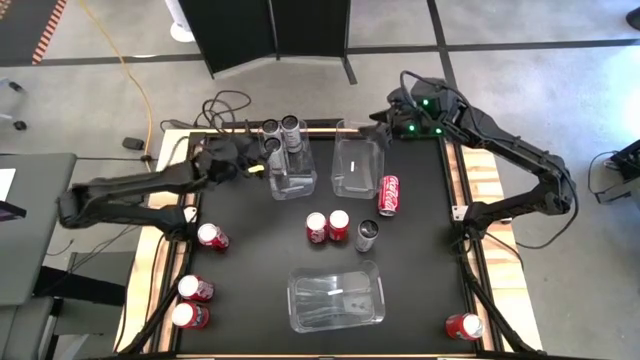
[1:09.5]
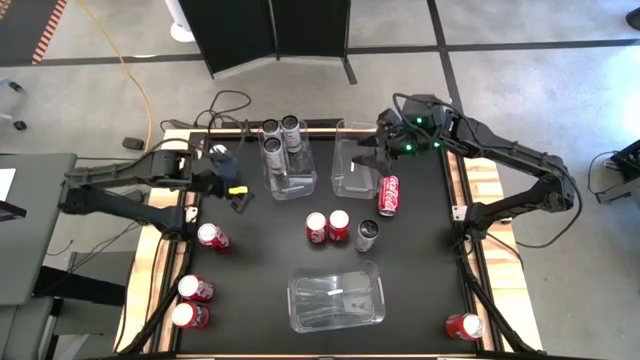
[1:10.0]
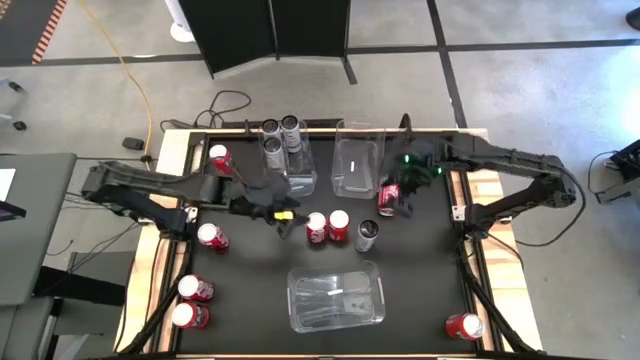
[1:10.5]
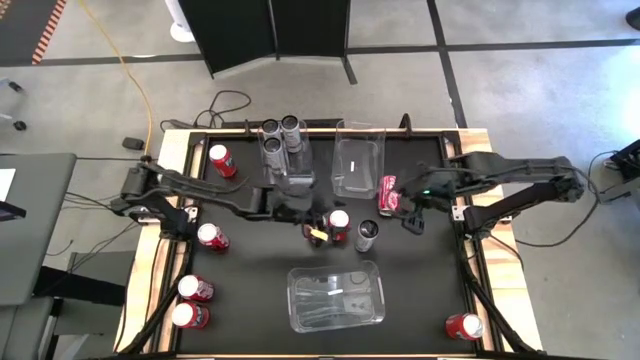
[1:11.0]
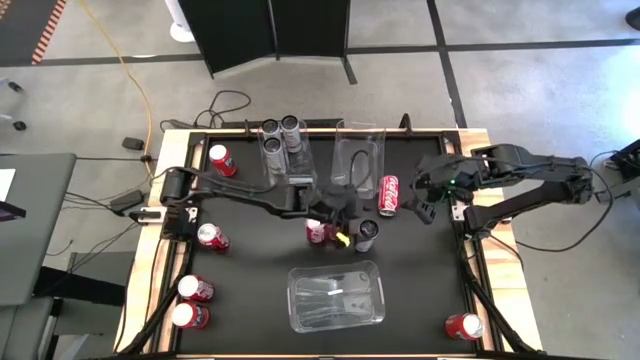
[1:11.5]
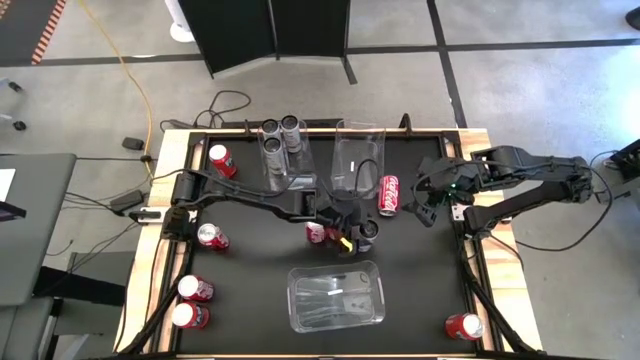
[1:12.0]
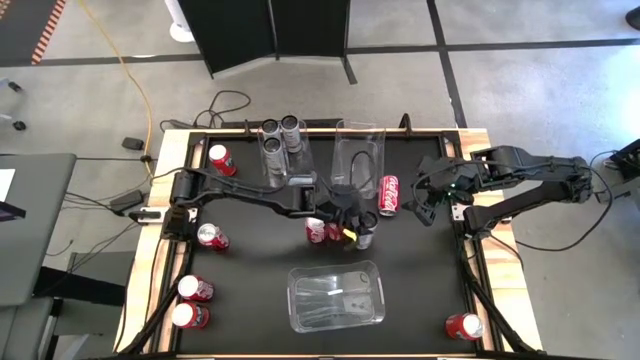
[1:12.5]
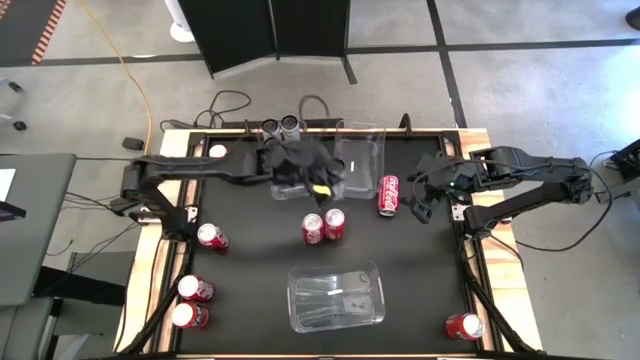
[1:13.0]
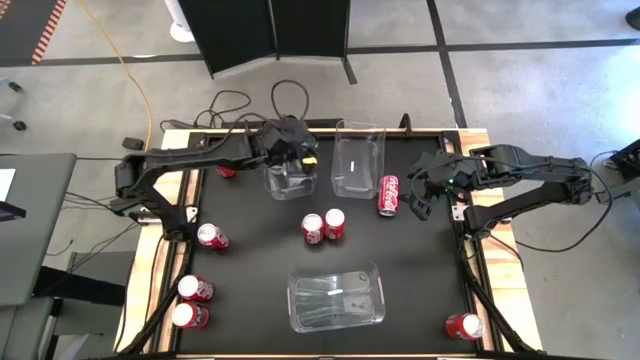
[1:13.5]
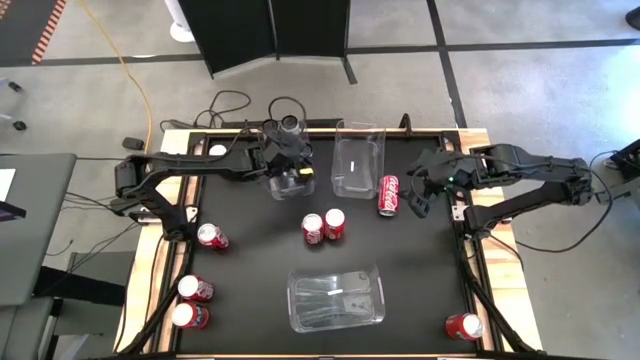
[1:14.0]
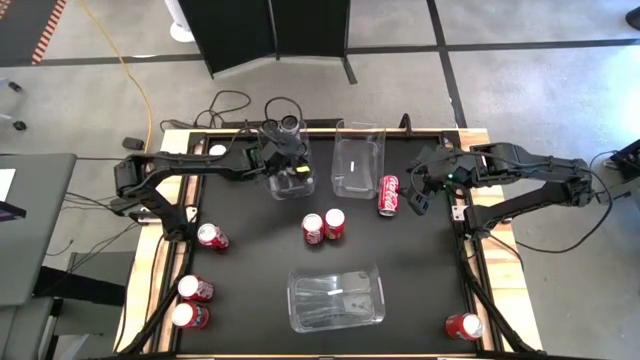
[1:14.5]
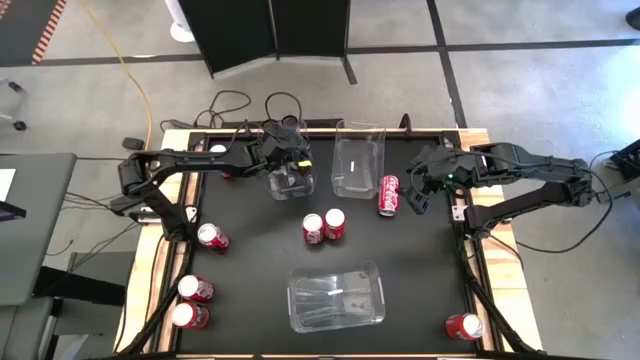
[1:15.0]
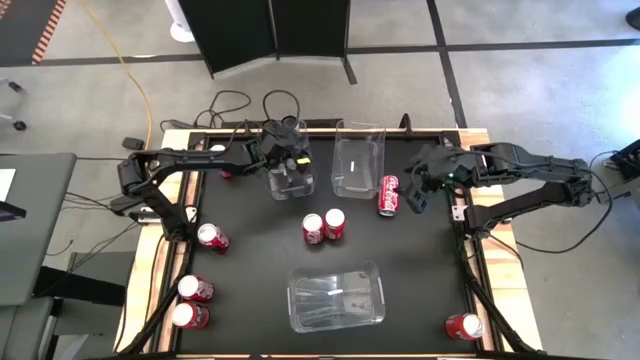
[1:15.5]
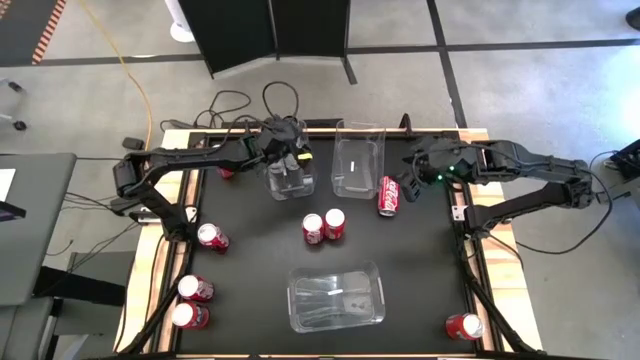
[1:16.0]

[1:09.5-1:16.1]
Task: Sort soda cans
Put the white soda can into the top left transparent bin

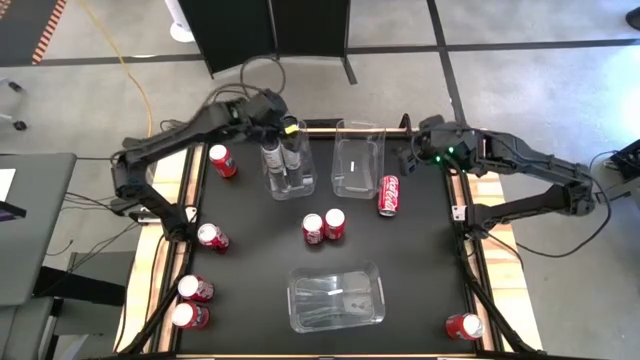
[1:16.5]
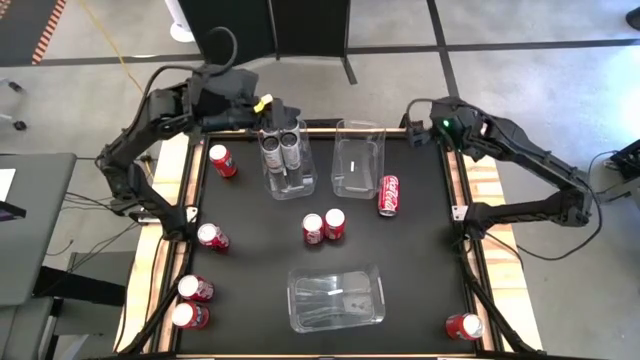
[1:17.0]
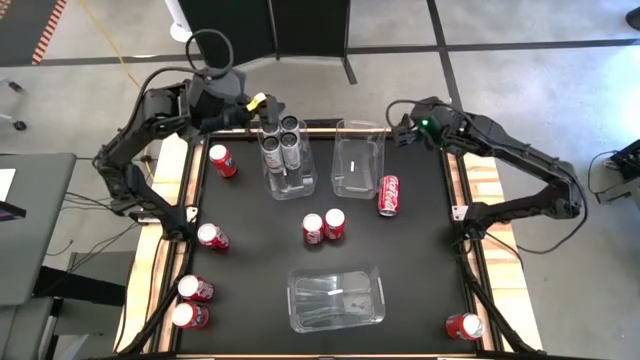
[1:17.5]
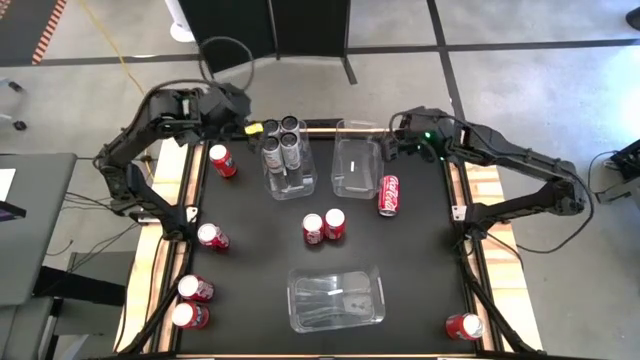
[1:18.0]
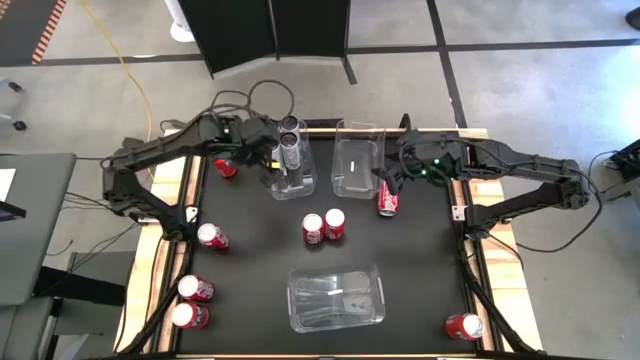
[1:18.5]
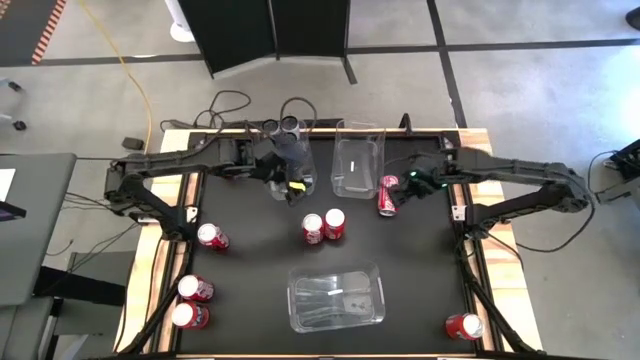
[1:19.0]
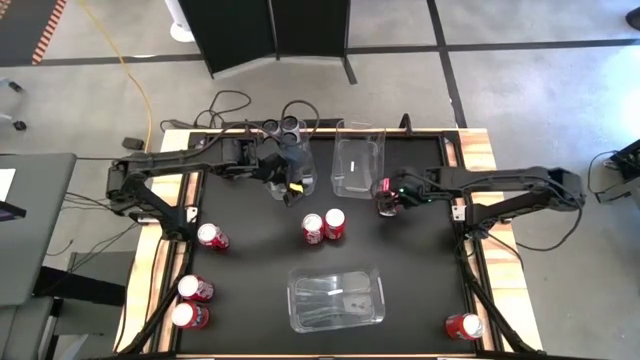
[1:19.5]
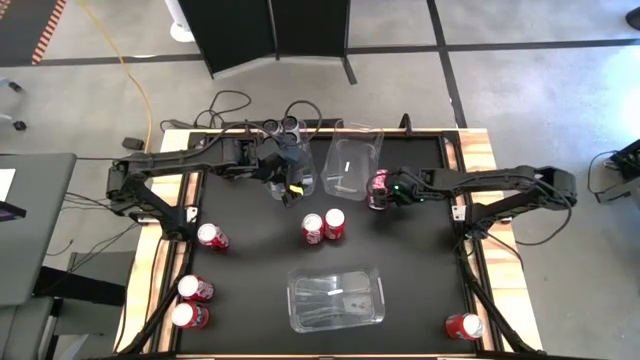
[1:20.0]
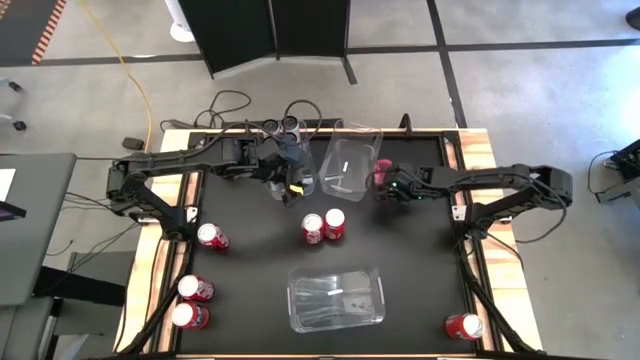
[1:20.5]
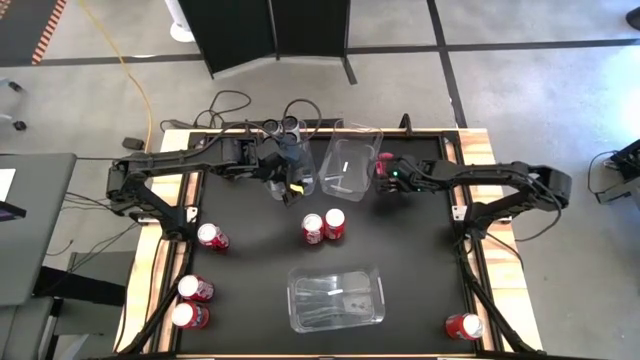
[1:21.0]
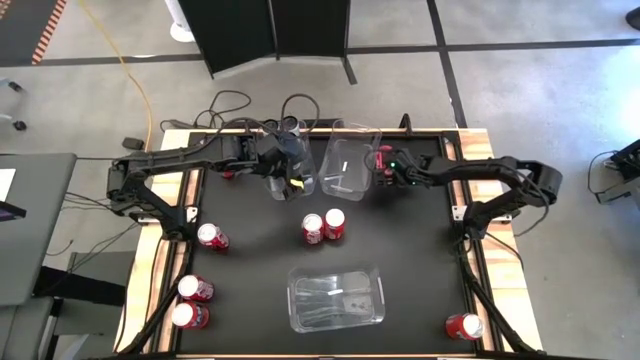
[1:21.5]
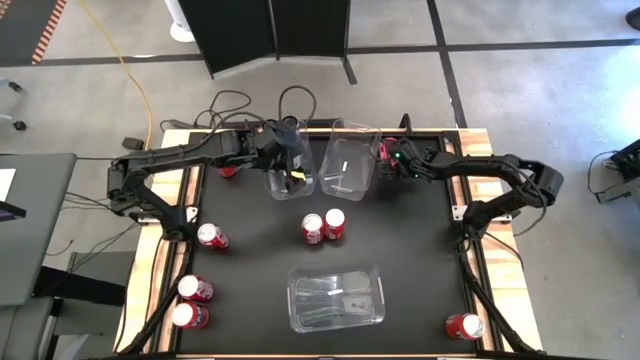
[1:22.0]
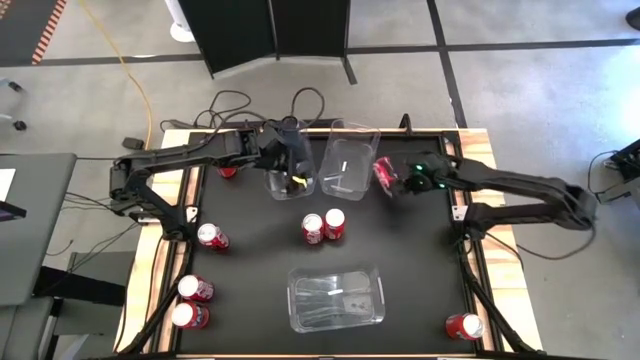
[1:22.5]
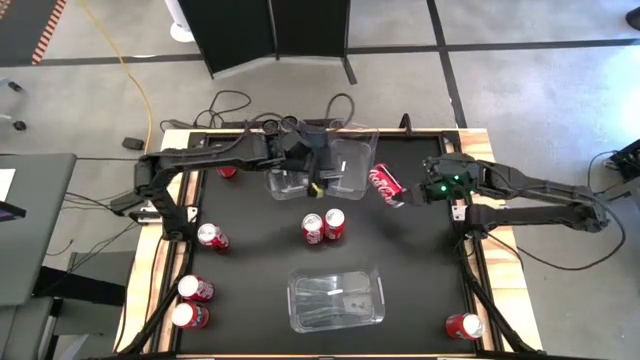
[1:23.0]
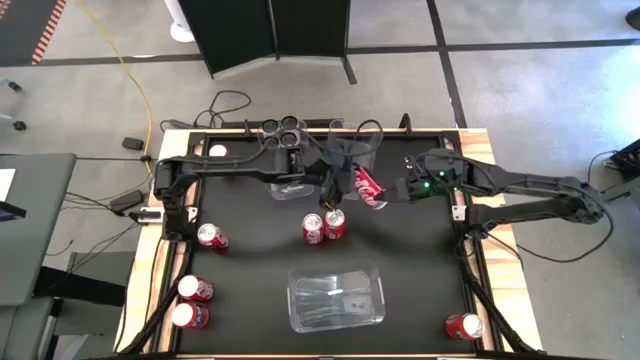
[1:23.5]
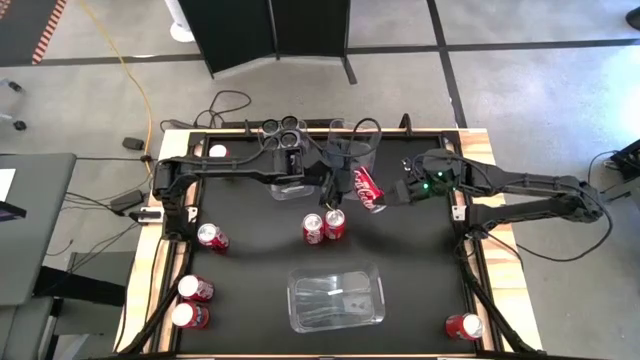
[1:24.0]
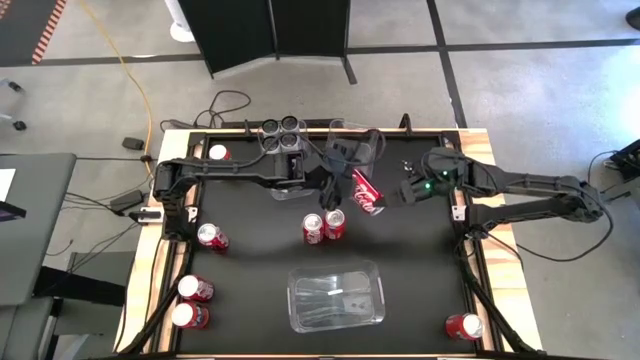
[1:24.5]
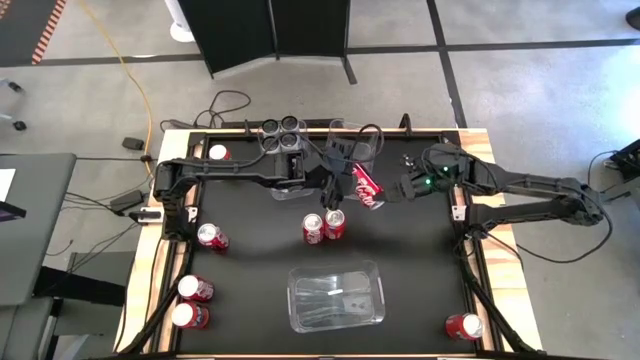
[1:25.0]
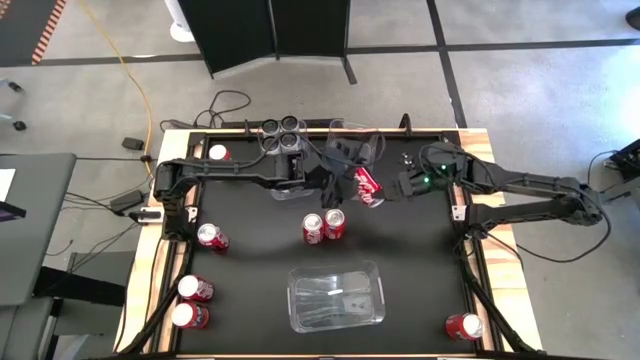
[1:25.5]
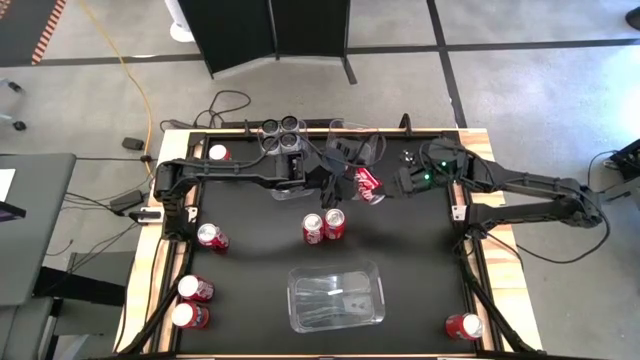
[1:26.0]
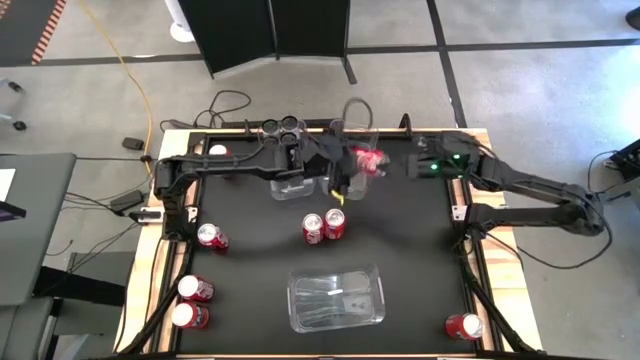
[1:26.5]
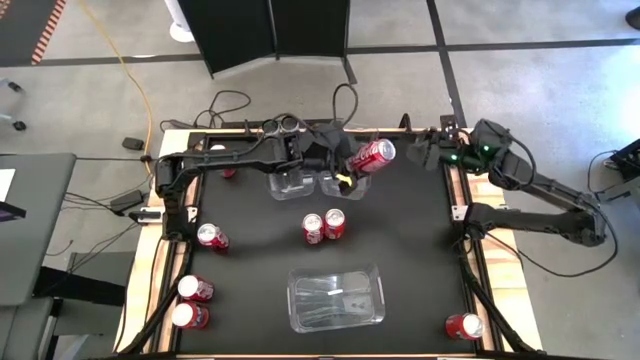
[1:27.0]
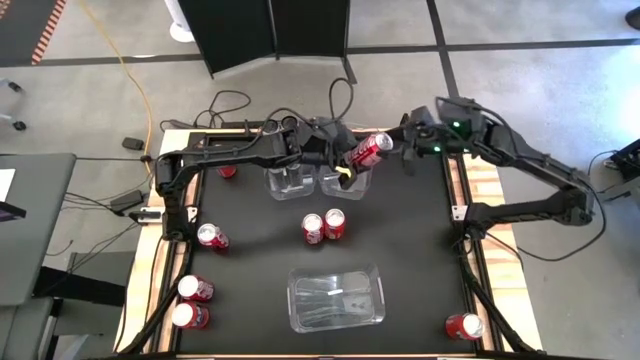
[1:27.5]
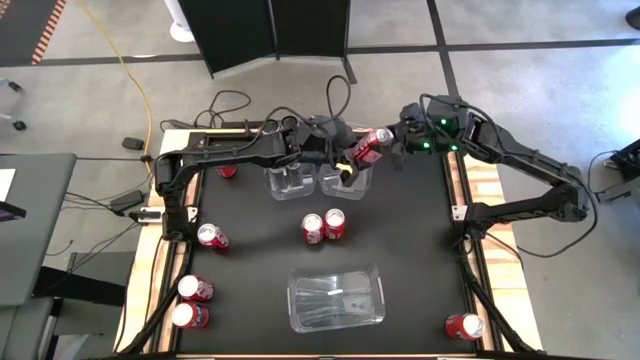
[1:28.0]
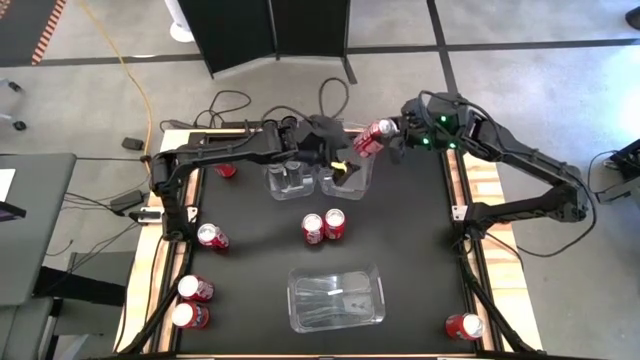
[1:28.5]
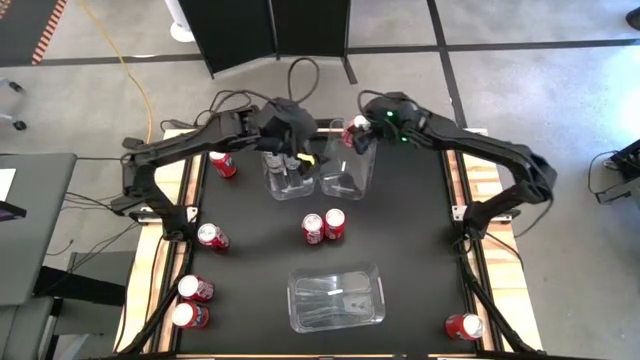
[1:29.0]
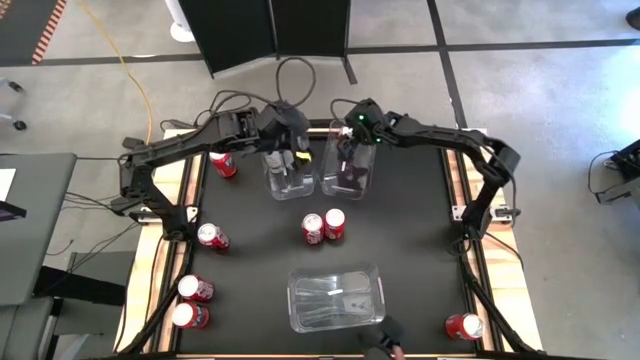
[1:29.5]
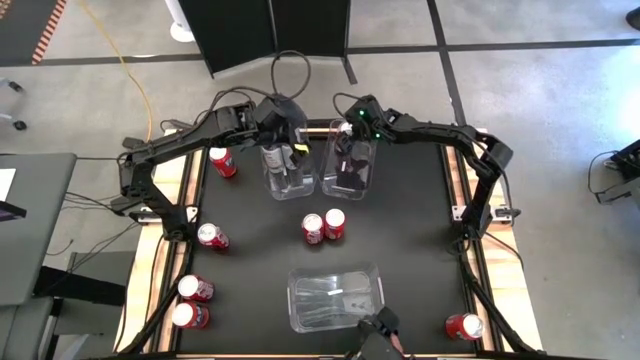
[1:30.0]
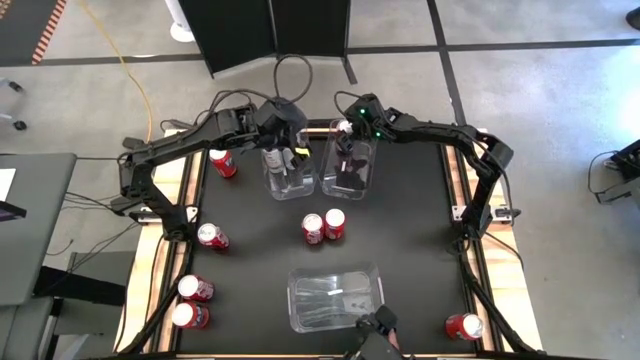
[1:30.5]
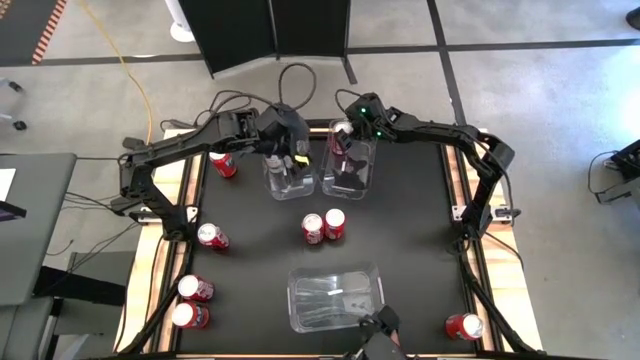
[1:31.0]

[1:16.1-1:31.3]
Put the top red soda can into the top right transparent bin
